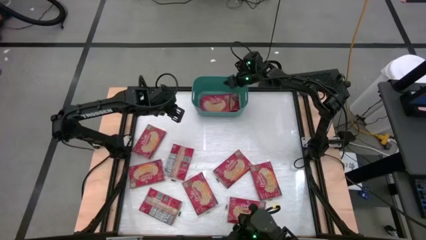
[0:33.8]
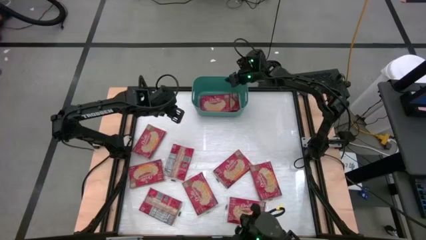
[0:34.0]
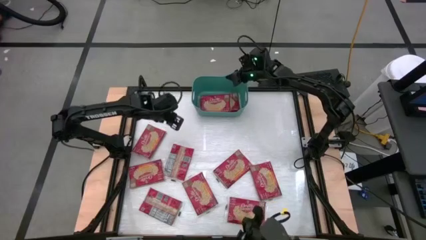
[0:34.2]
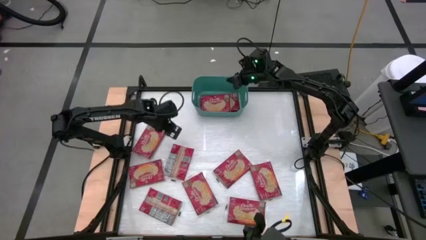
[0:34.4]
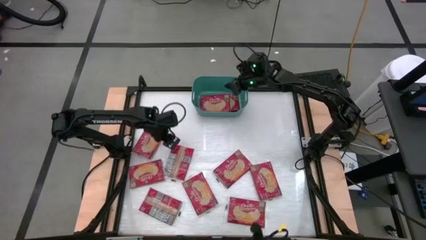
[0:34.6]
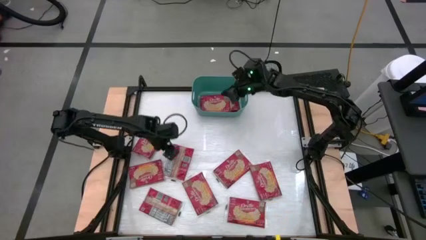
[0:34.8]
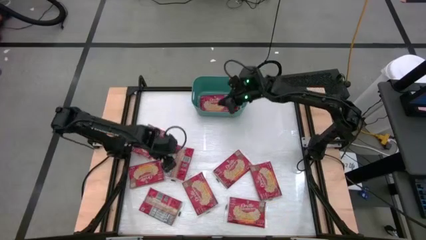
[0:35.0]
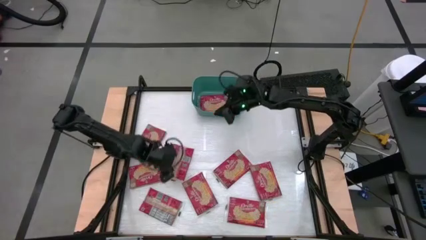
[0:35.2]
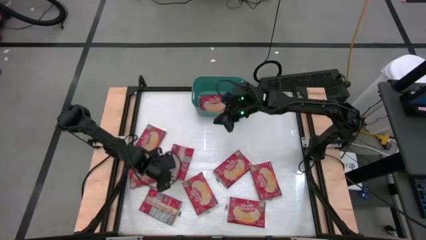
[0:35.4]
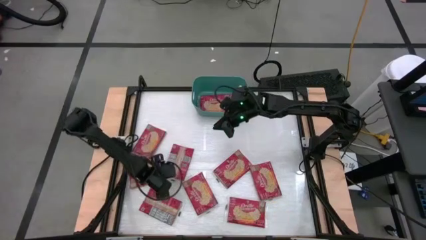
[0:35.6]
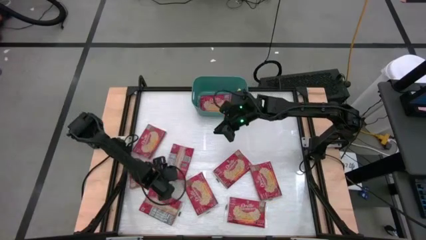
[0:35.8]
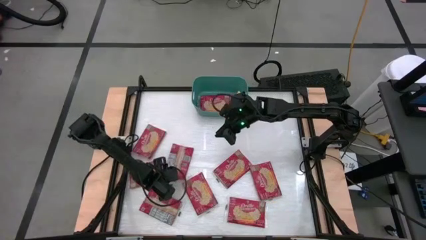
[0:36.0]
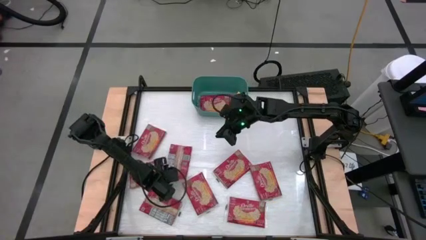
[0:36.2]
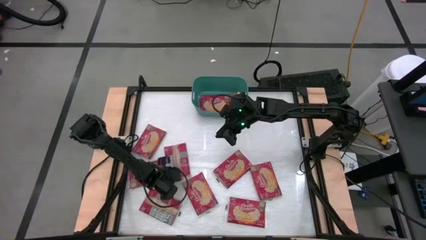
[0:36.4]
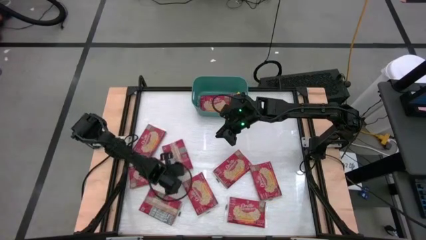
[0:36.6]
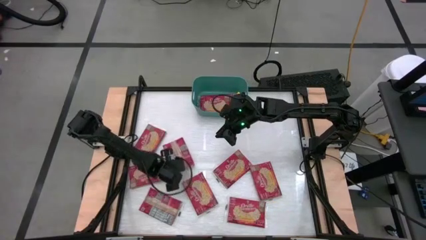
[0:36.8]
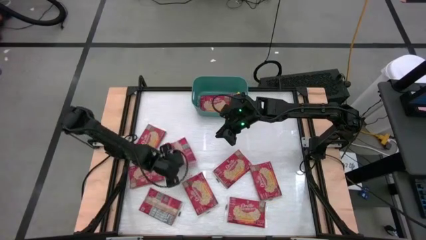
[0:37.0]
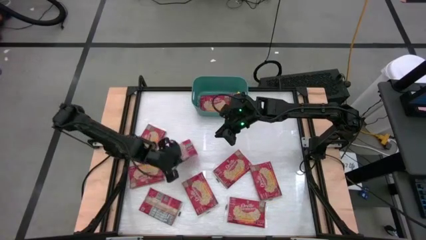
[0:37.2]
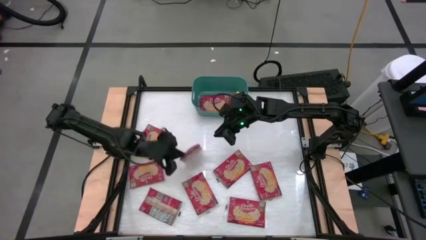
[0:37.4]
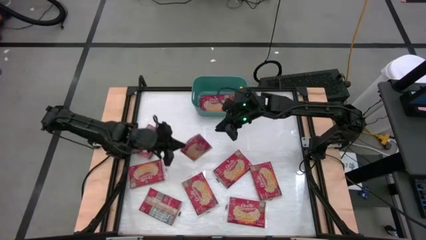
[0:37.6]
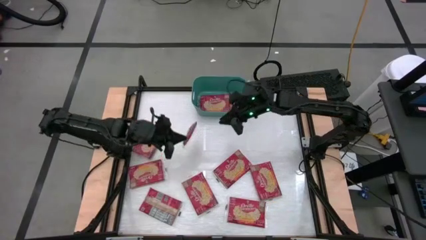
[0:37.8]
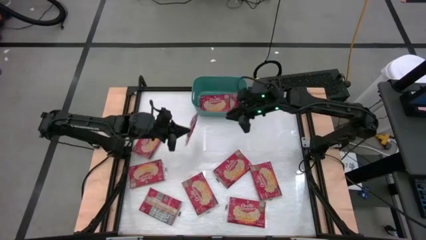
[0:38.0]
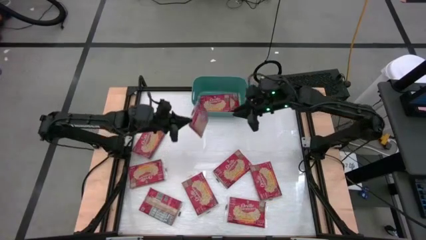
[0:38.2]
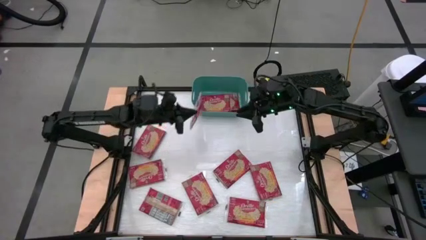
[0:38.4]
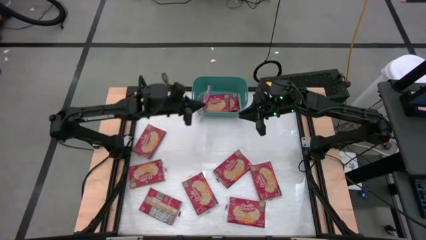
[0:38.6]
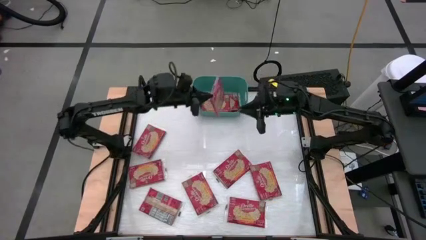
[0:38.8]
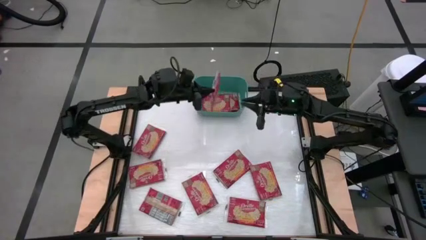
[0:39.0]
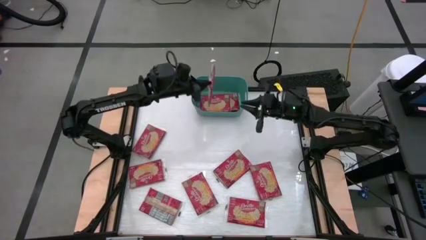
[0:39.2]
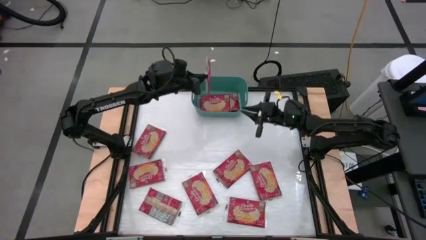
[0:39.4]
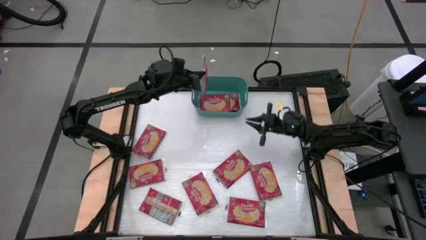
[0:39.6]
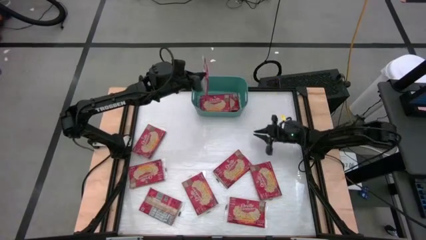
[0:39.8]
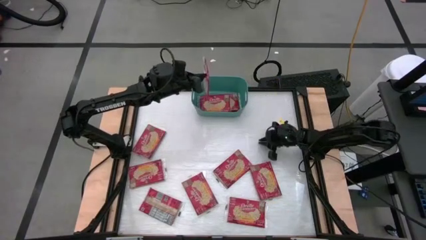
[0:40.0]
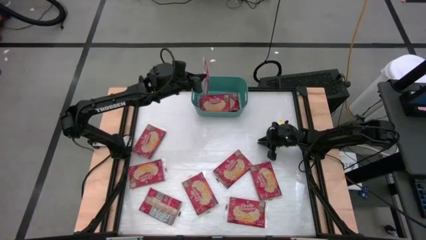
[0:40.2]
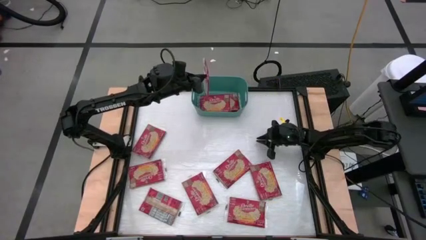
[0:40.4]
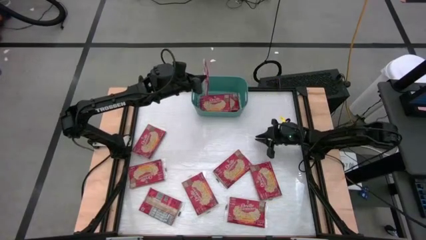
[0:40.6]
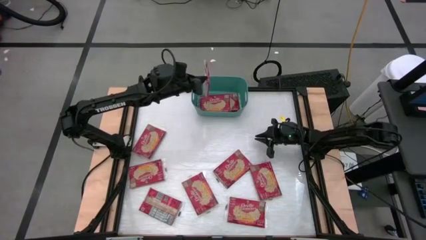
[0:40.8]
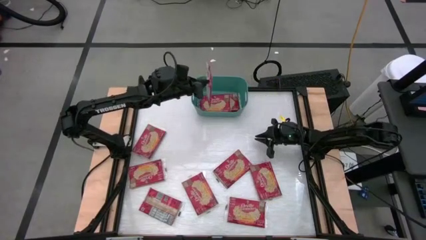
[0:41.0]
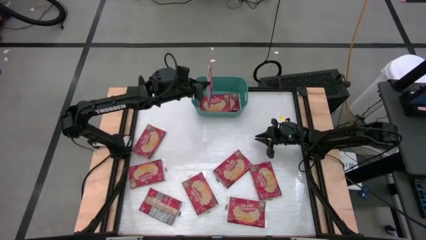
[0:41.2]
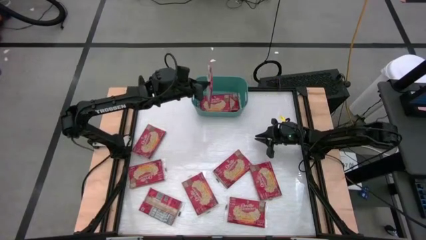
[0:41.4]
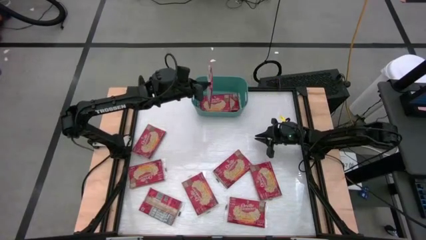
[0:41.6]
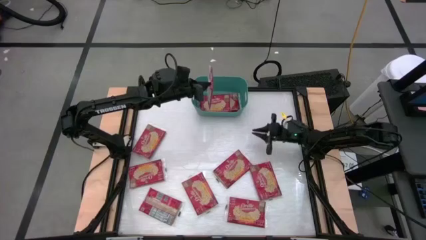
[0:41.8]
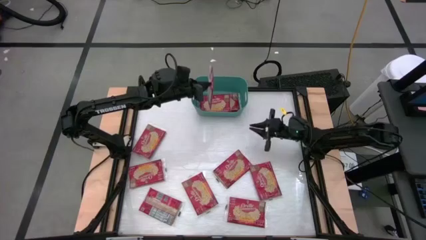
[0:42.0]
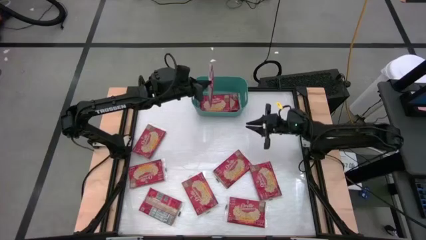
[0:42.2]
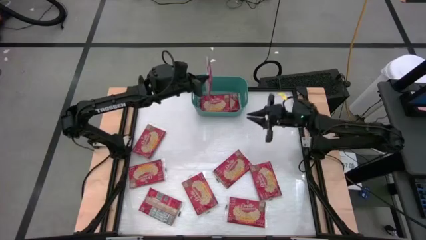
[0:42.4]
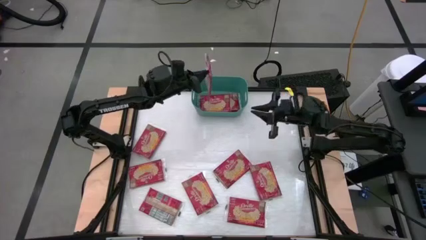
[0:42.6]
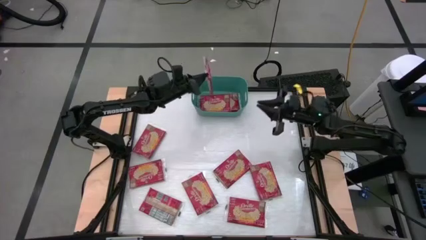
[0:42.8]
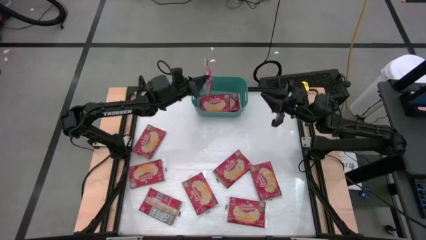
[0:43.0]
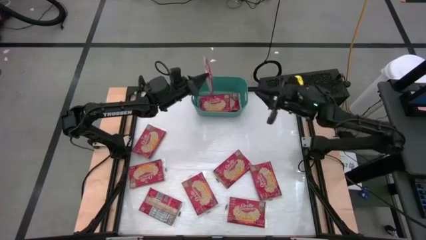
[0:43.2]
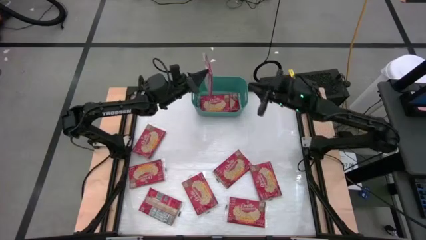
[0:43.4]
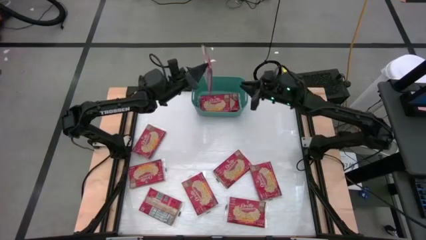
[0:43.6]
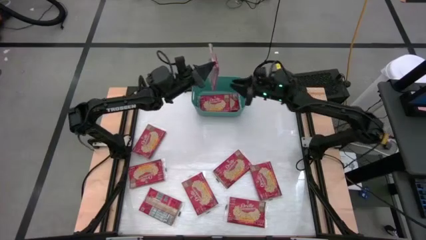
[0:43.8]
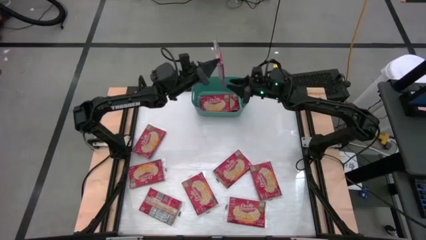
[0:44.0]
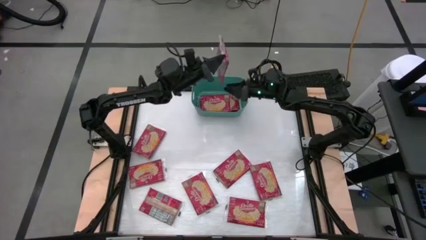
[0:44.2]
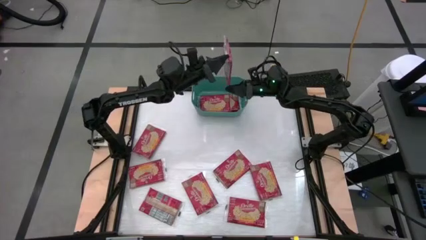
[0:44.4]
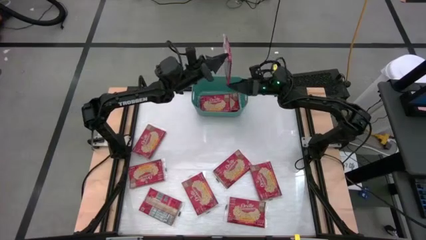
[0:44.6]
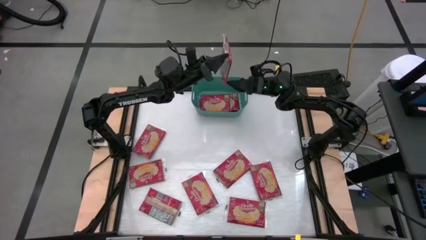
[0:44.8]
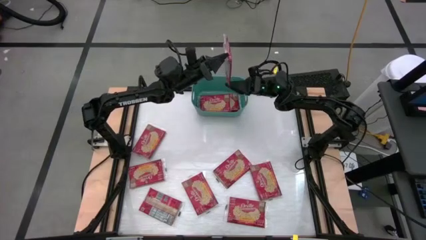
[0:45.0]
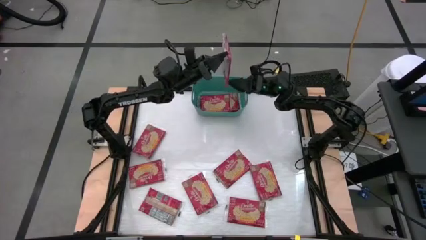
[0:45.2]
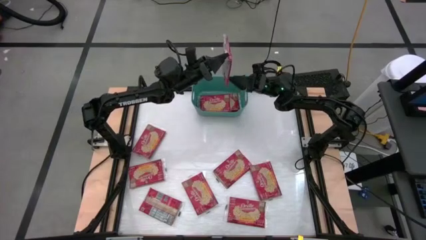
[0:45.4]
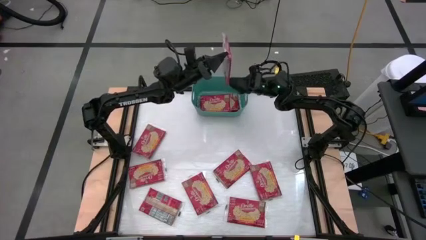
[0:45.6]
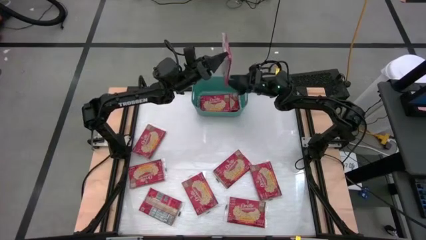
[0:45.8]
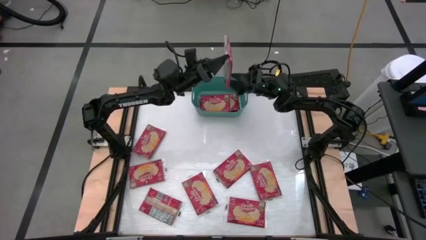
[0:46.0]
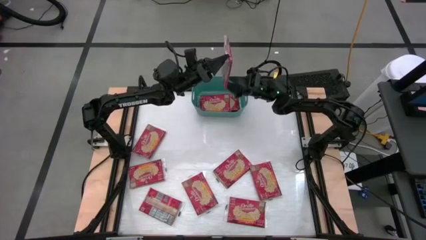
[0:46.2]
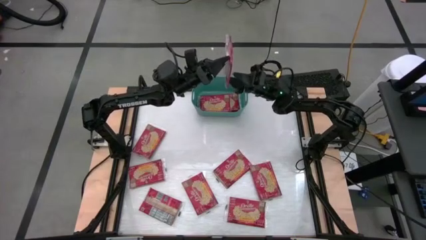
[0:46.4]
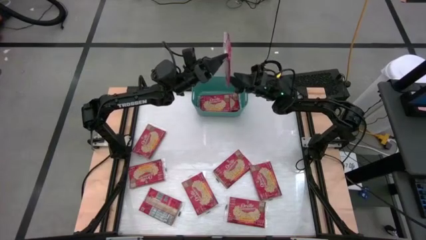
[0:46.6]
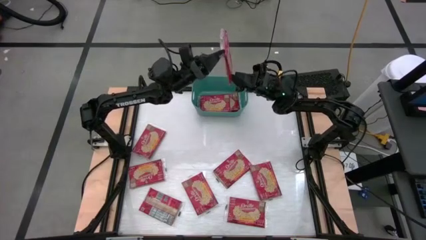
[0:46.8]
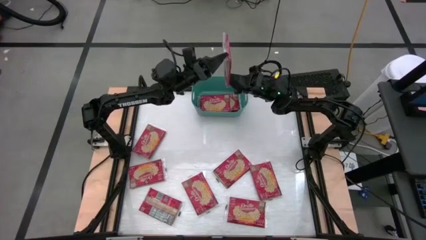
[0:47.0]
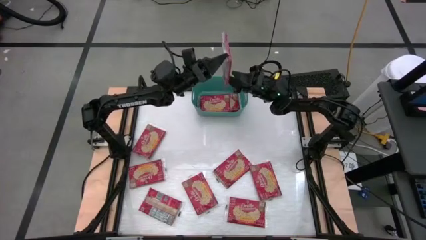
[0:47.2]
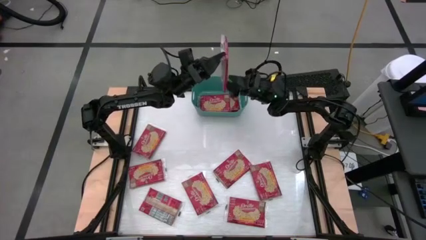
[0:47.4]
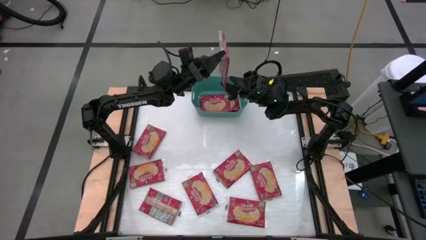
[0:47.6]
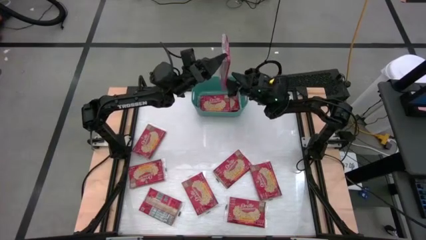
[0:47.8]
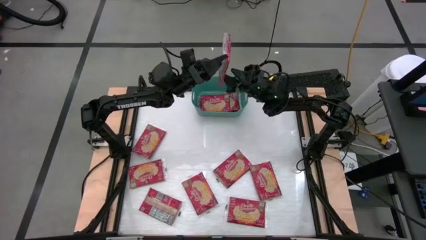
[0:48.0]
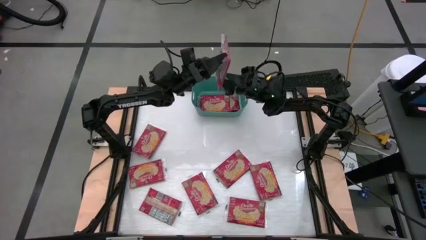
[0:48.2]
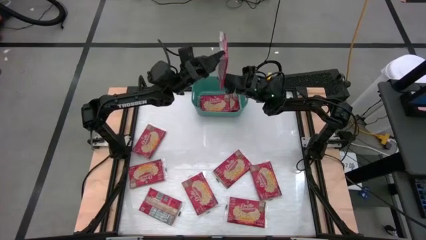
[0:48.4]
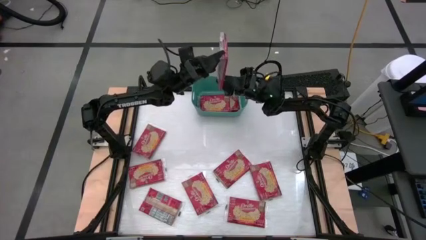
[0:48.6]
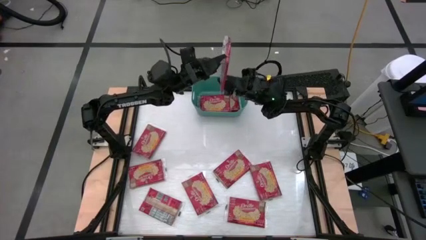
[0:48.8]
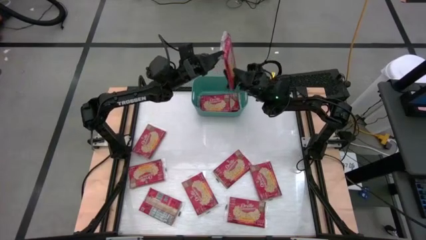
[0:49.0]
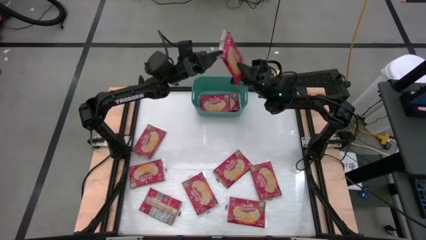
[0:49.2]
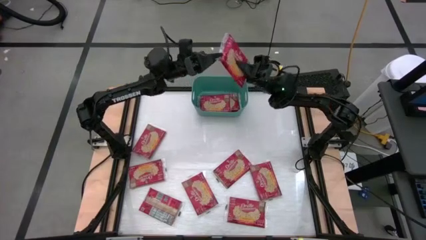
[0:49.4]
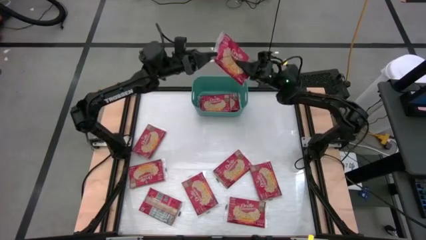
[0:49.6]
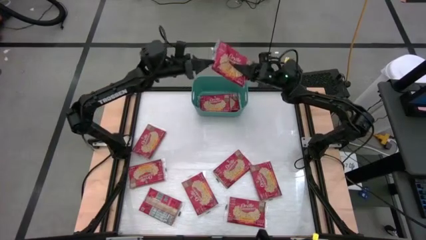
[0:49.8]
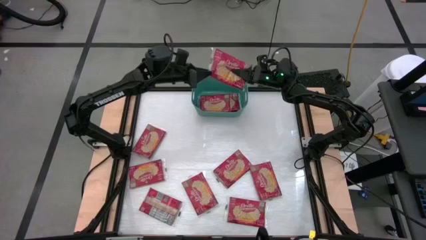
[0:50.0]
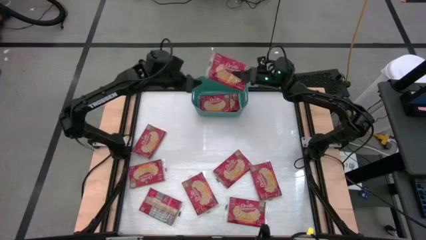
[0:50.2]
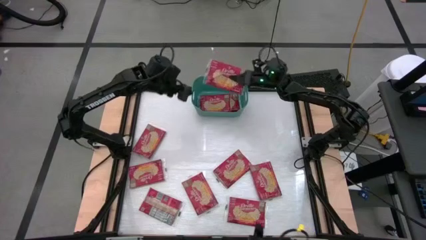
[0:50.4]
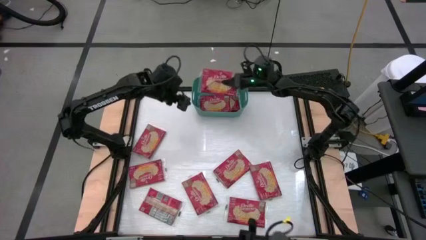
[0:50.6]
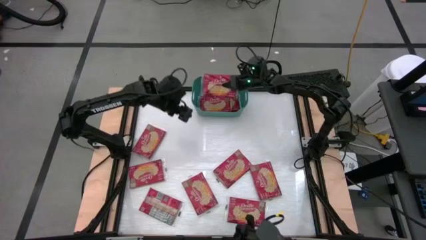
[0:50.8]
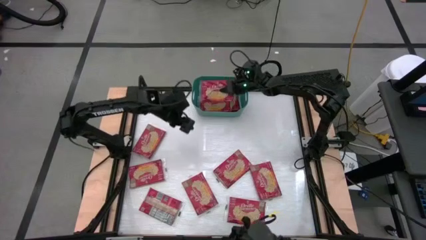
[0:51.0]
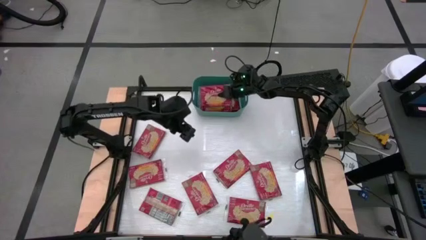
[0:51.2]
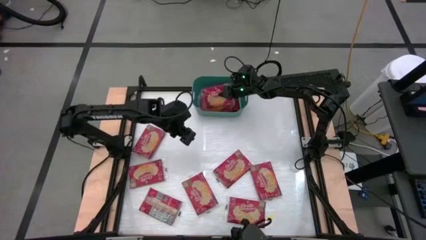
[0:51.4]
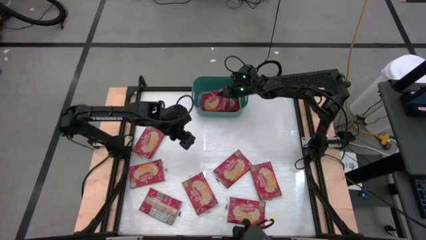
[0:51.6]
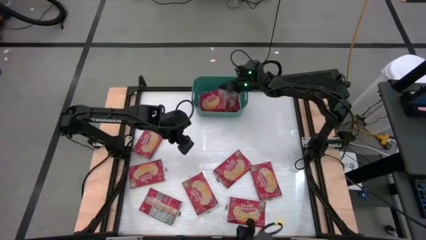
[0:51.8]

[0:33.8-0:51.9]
Task: Sort popcorn bags into baskets
Put the popcorn bag into the green bin
